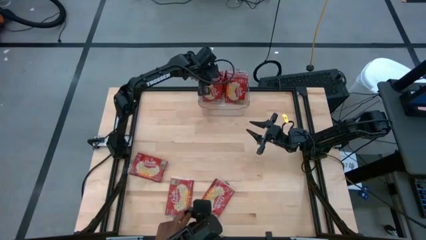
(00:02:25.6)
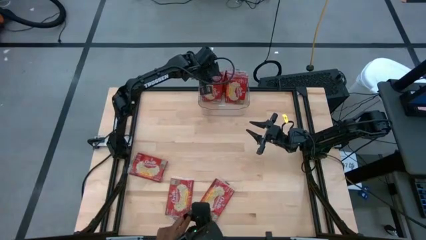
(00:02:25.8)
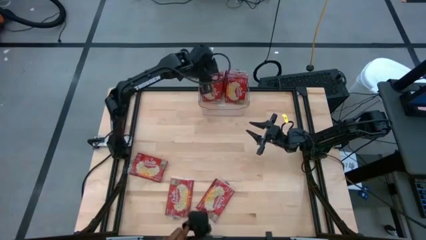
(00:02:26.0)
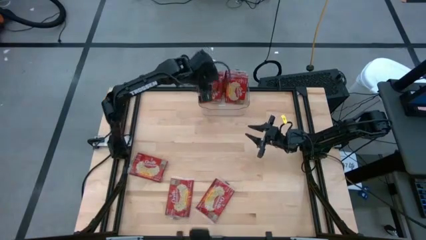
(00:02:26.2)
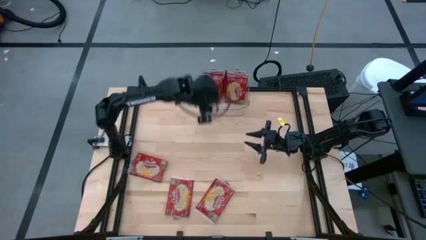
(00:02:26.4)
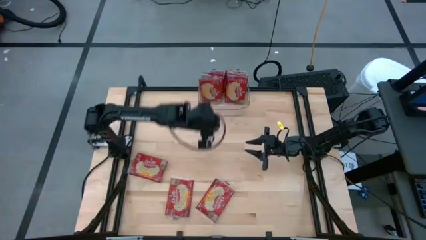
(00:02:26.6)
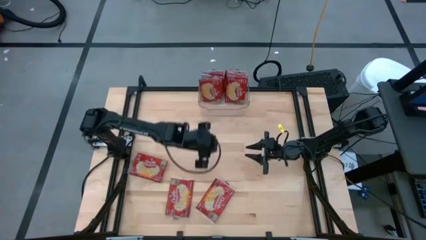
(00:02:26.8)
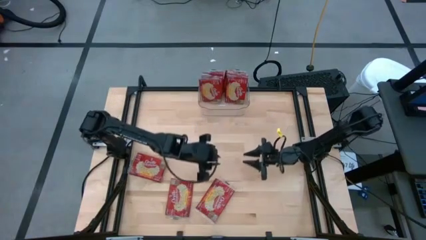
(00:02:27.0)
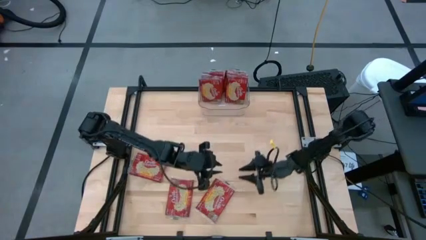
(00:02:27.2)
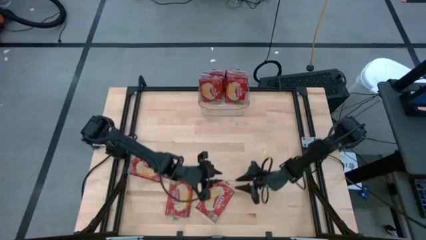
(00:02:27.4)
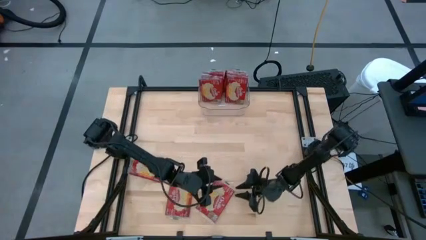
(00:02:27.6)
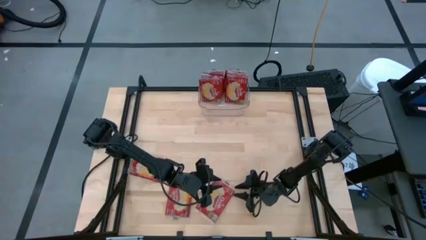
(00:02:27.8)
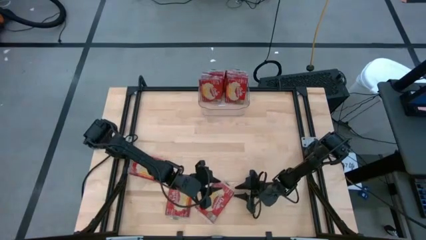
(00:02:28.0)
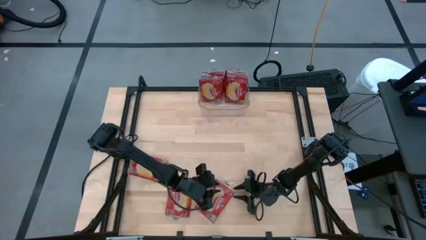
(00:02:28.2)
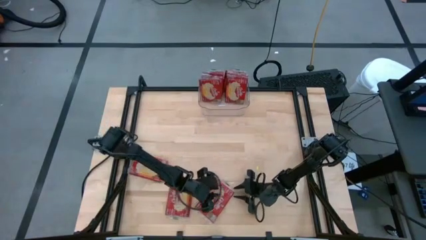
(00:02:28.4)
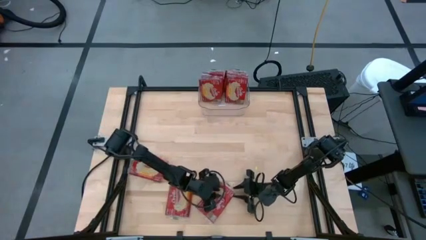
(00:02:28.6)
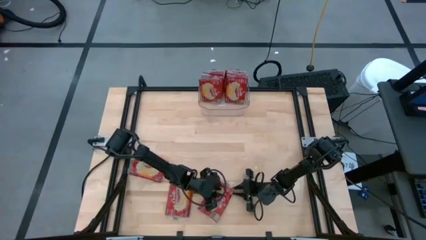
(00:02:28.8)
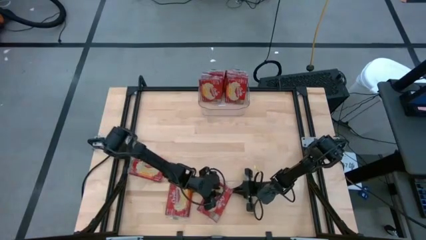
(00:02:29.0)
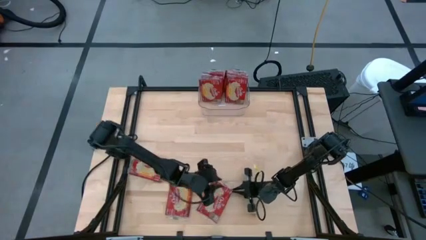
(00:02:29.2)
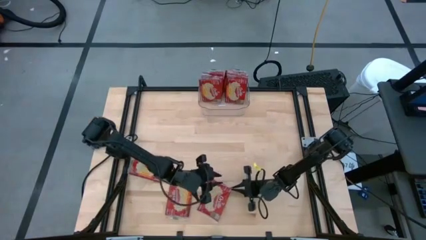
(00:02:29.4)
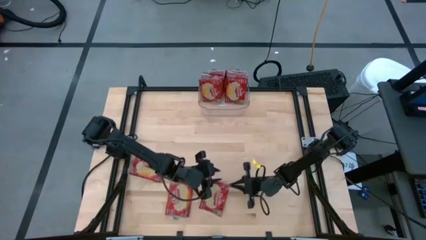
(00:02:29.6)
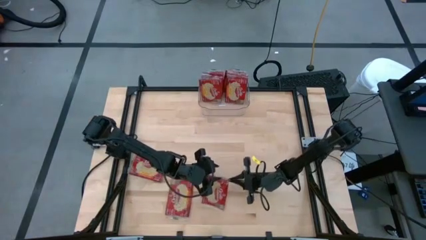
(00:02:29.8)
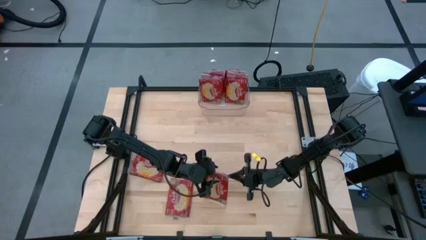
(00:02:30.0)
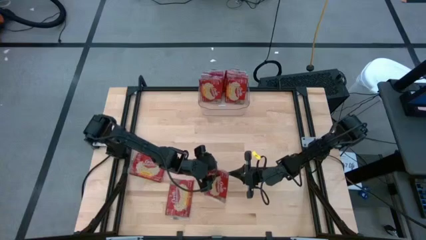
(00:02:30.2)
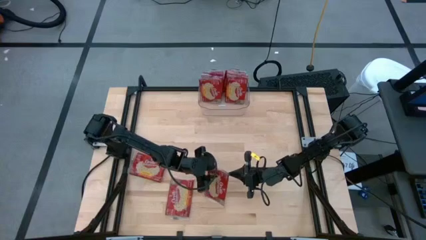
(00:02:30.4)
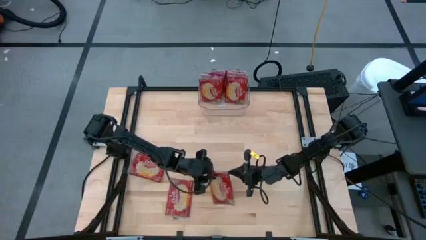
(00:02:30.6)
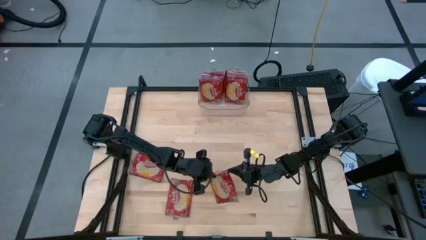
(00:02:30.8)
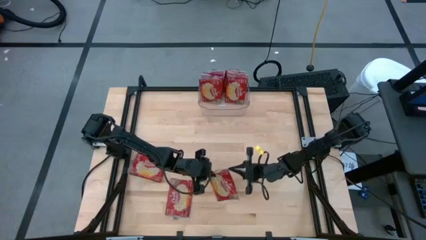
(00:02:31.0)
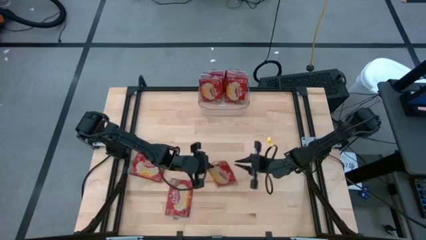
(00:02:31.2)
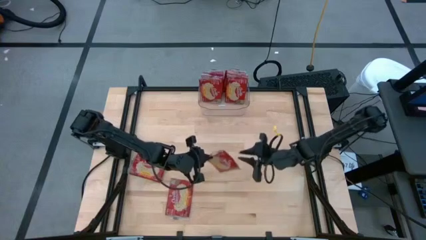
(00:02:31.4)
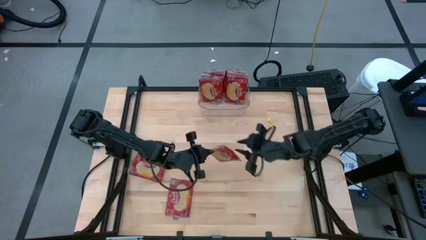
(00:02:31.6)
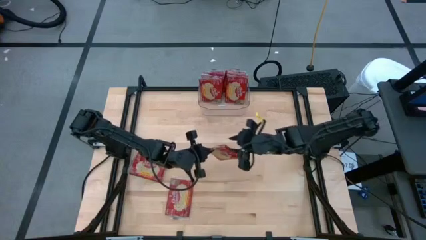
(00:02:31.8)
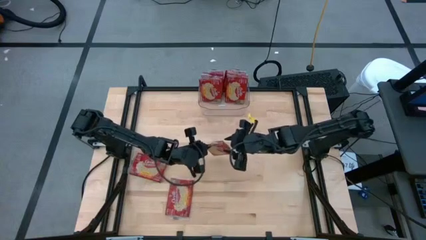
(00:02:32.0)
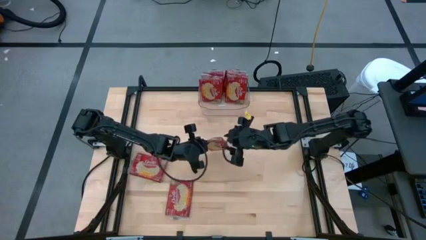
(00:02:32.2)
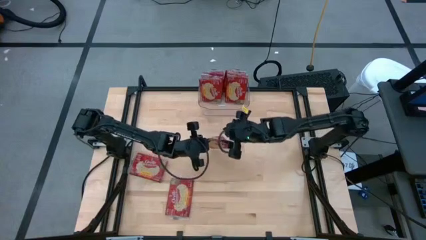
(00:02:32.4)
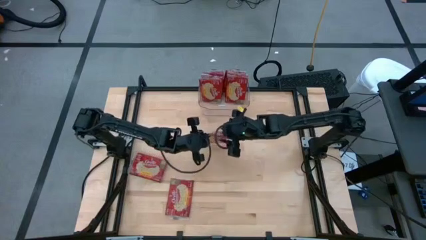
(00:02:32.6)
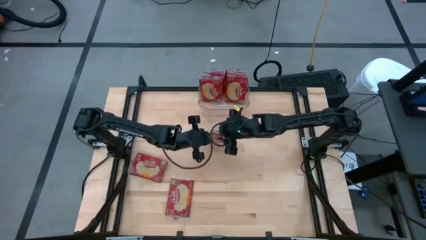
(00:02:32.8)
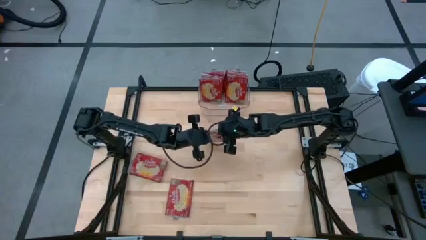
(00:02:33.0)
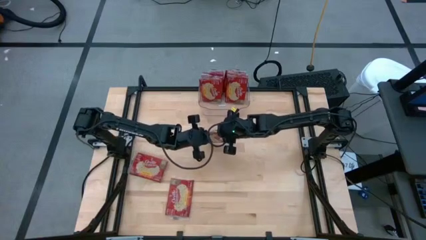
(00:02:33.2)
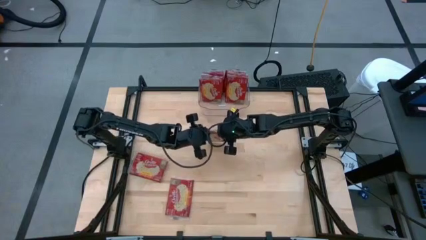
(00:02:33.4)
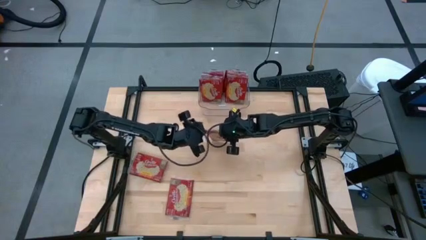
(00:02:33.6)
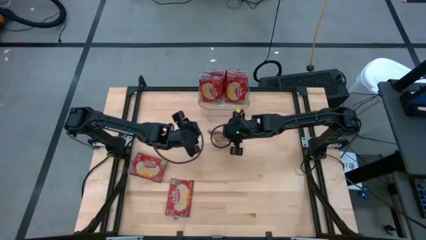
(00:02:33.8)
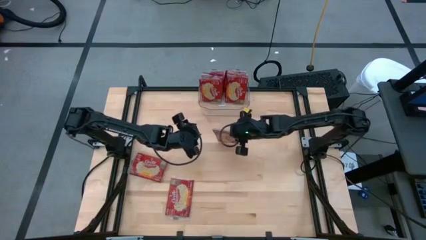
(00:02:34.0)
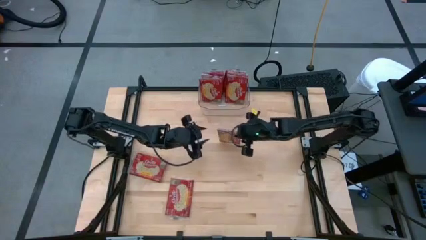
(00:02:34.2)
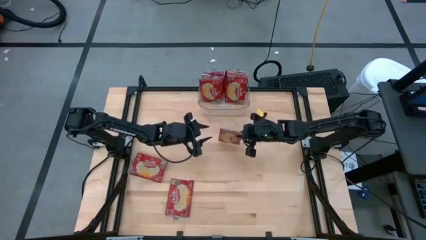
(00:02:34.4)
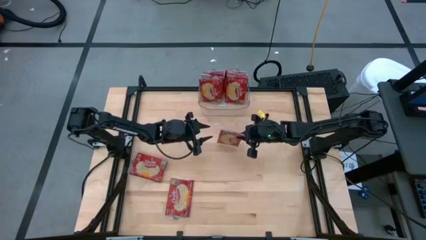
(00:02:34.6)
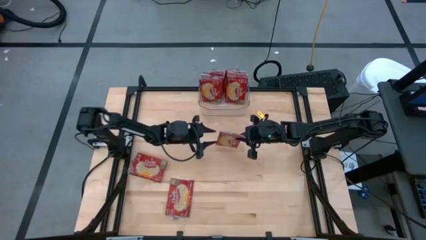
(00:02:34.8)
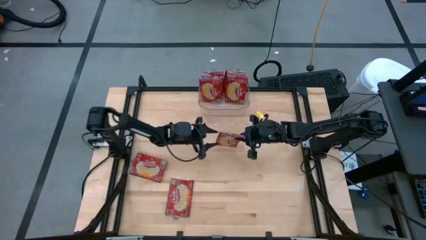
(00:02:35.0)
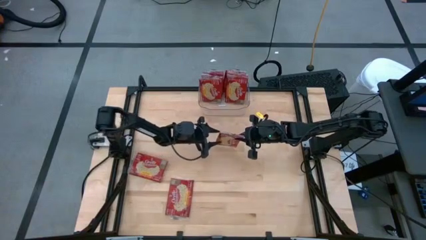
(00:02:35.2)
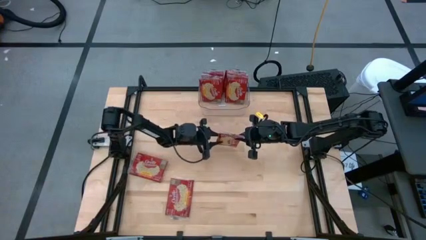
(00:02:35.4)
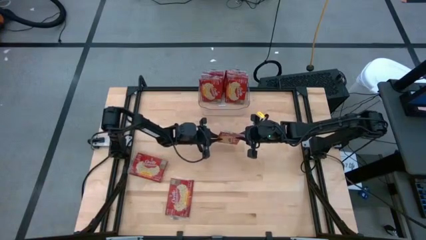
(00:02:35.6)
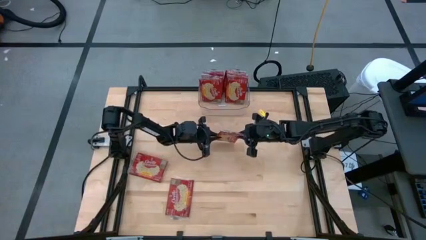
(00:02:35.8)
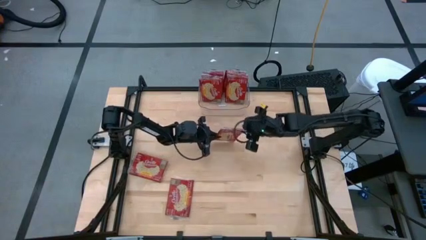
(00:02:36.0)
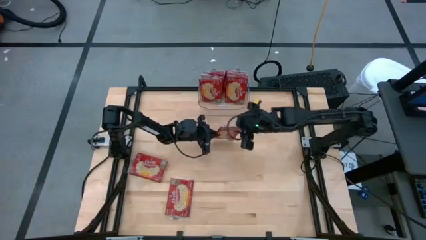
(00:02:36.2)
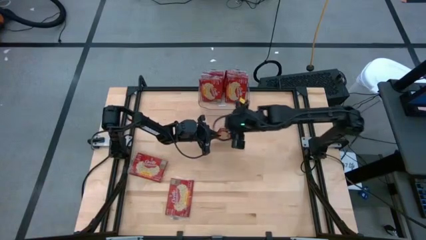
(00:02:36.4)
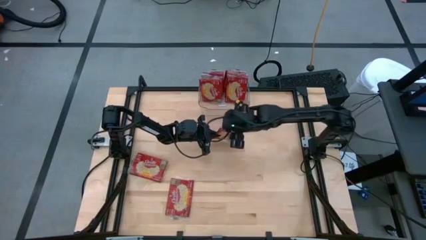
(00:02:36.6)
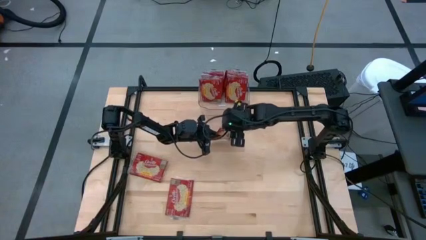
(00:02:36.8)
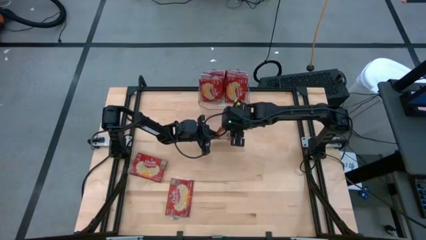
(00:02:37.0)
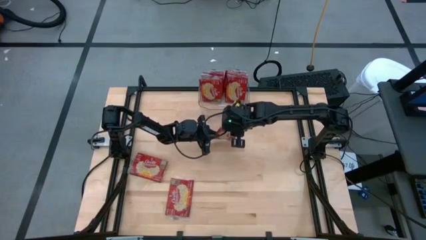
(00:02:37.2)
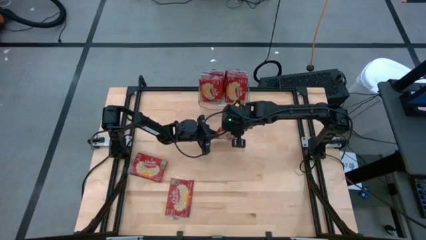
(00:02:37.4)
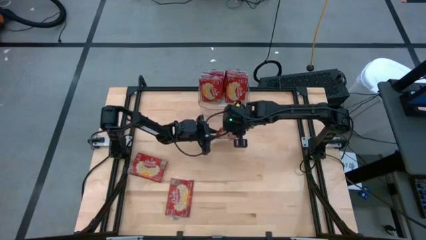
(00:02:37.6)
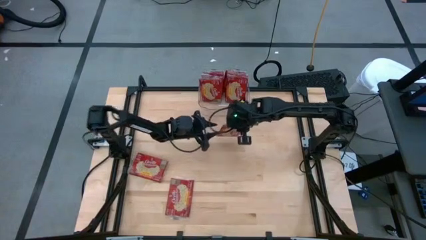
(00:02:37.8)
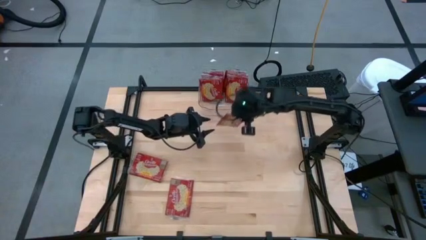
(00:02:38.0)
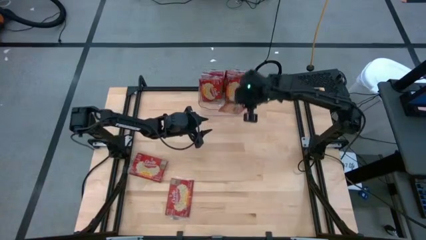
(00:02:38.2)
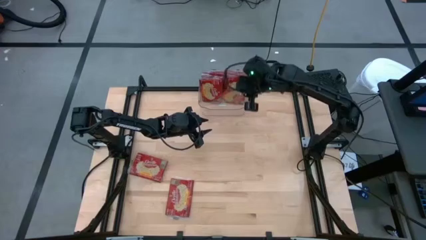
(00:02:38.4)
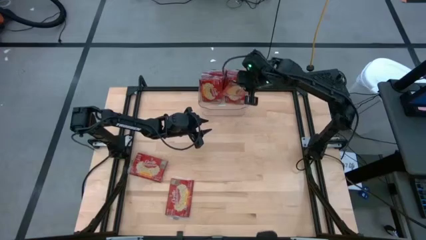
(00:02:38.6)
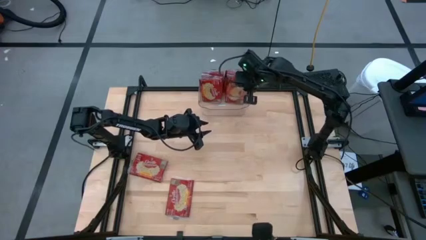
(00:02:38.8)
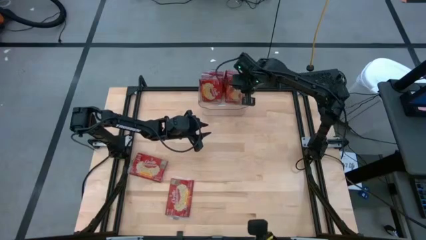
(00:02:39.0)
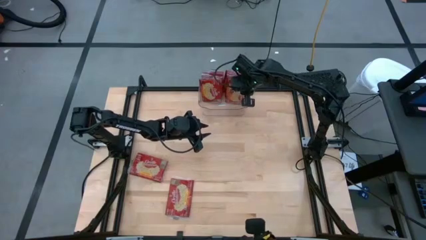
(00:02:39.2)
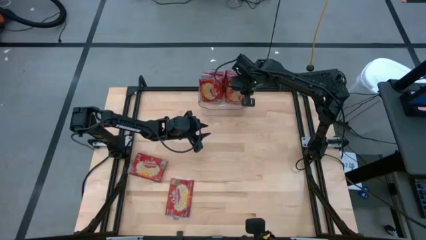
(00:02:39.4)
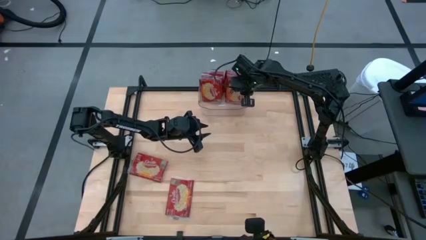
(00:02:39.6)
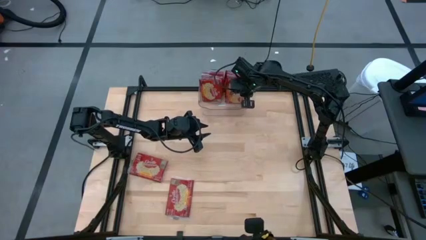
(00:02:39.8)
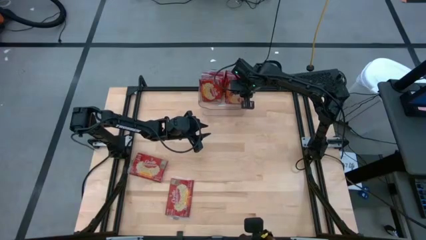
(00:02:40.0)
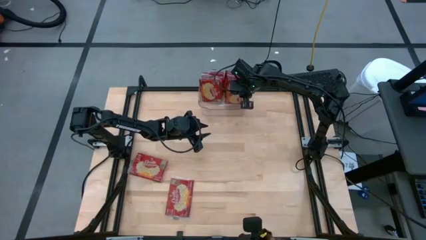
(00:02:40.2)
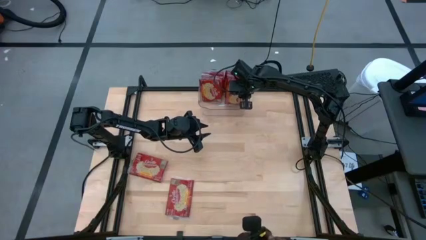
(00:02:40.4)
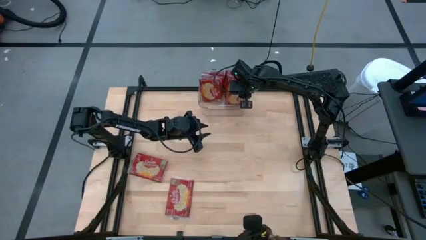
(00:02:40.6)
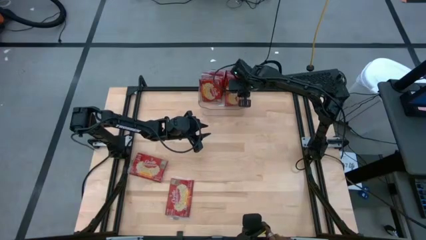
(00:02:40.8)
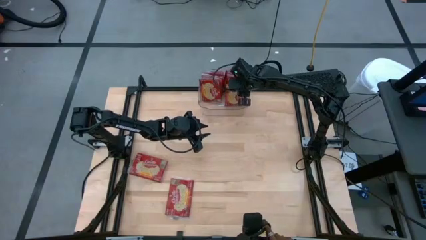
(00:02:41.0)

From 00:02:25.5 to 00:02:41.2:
Task: Sort popcorn bags into baskets
Put the red popcorn bag into the transparent bin
